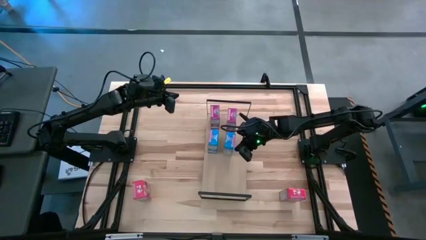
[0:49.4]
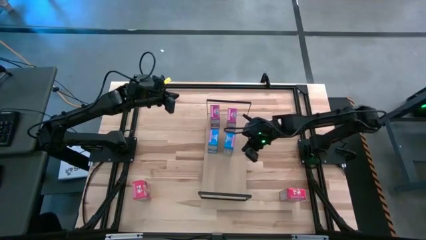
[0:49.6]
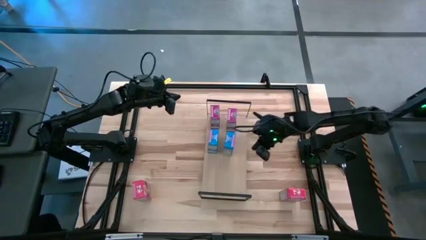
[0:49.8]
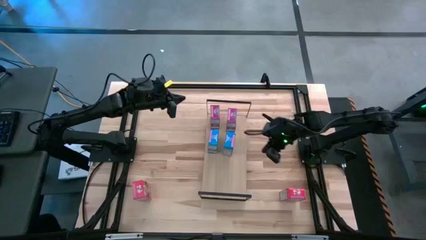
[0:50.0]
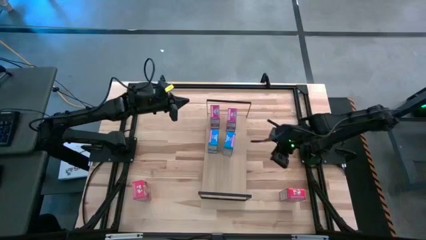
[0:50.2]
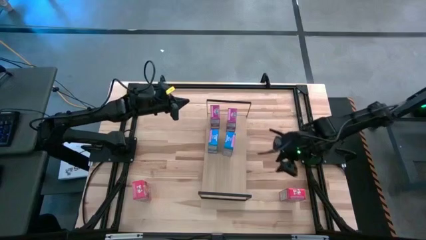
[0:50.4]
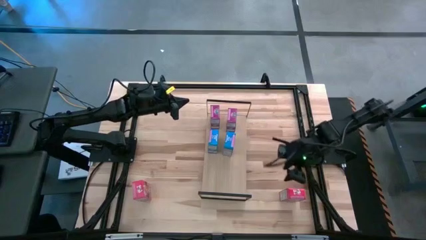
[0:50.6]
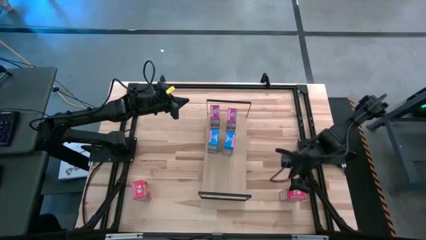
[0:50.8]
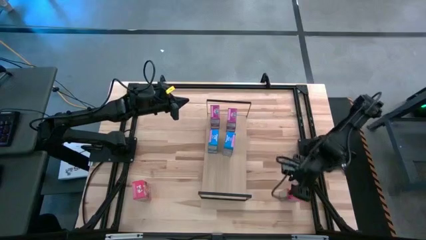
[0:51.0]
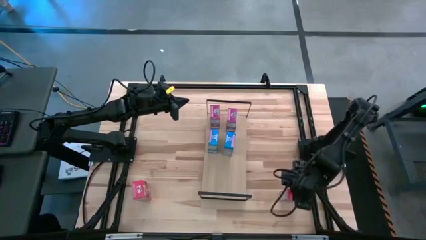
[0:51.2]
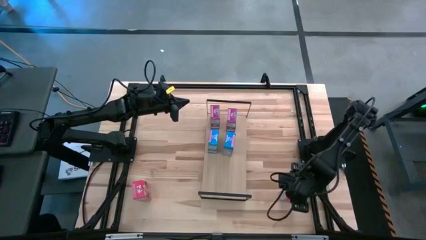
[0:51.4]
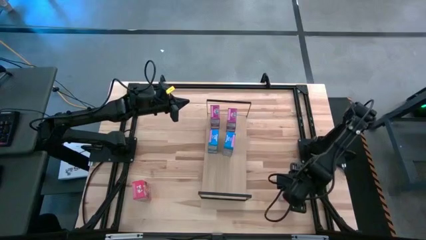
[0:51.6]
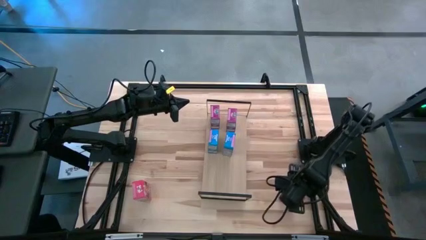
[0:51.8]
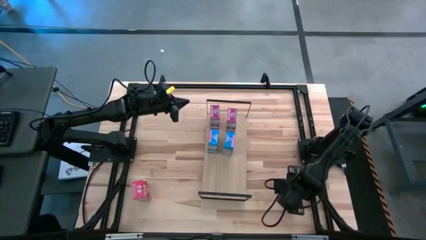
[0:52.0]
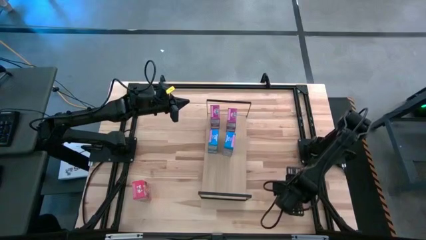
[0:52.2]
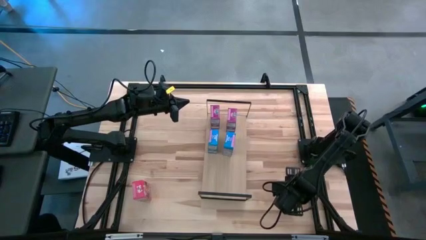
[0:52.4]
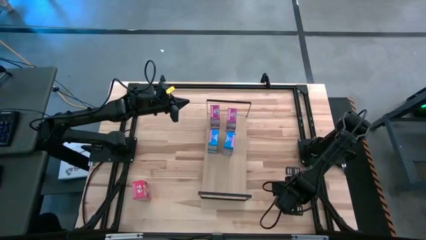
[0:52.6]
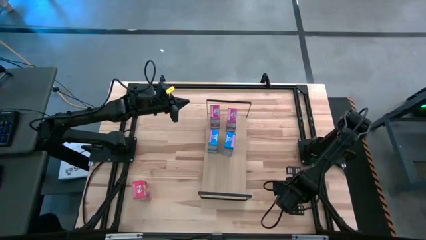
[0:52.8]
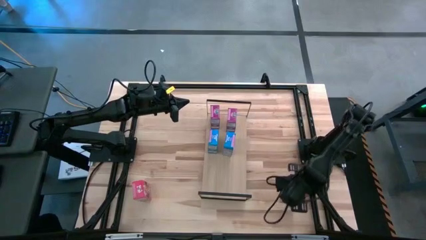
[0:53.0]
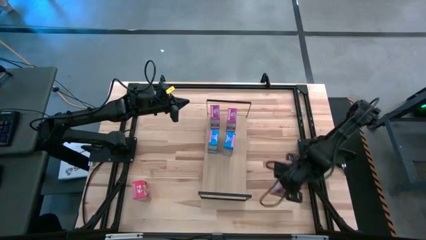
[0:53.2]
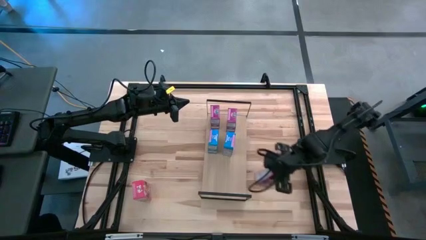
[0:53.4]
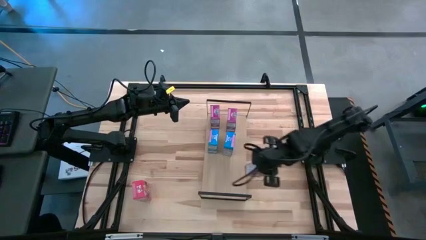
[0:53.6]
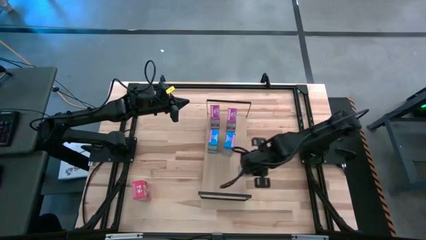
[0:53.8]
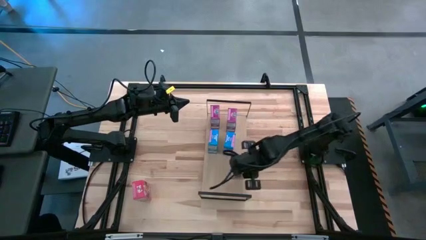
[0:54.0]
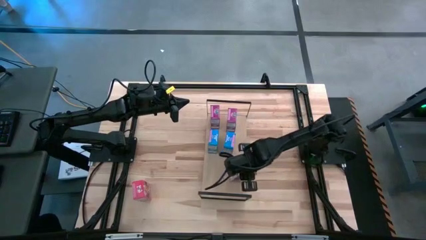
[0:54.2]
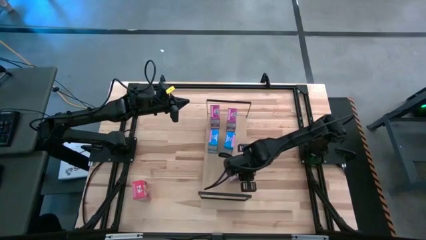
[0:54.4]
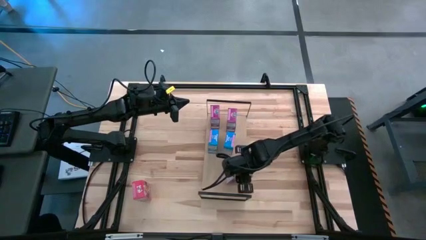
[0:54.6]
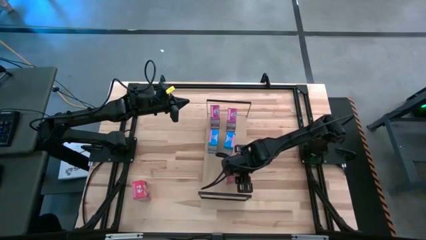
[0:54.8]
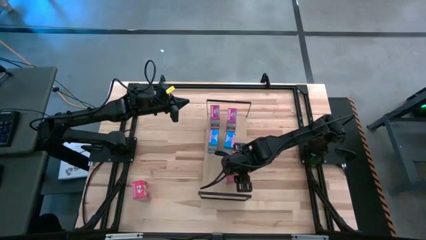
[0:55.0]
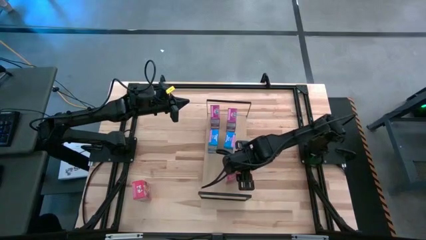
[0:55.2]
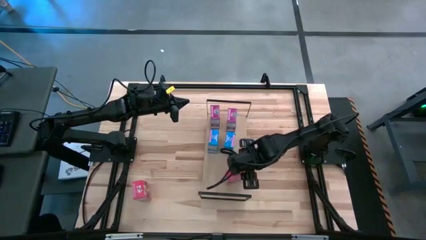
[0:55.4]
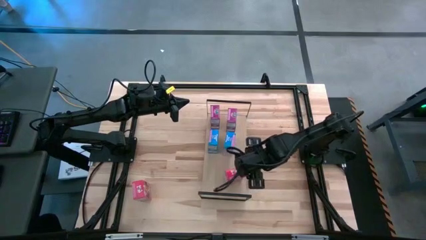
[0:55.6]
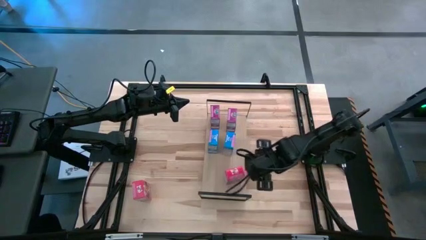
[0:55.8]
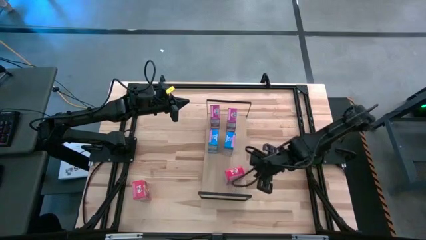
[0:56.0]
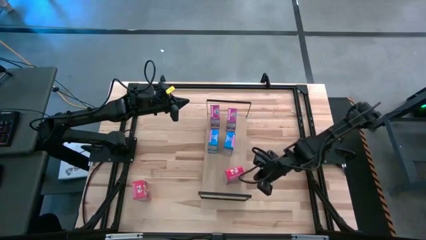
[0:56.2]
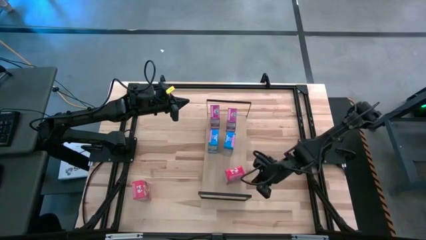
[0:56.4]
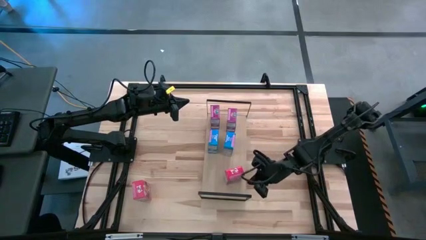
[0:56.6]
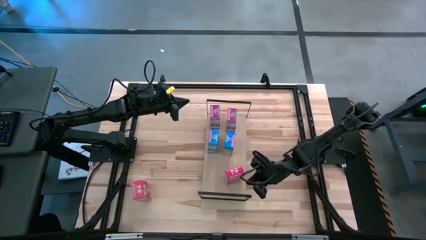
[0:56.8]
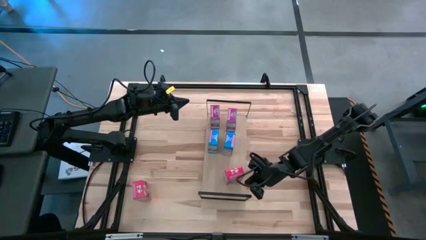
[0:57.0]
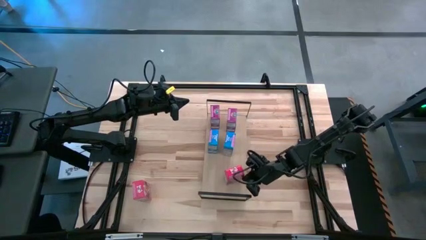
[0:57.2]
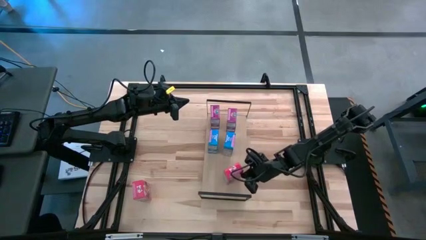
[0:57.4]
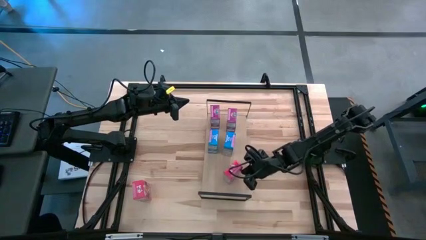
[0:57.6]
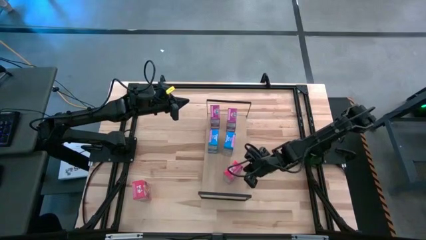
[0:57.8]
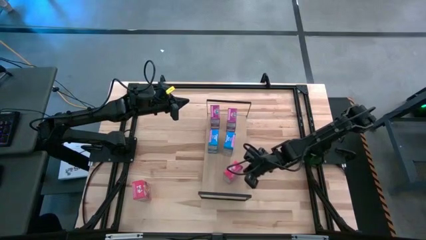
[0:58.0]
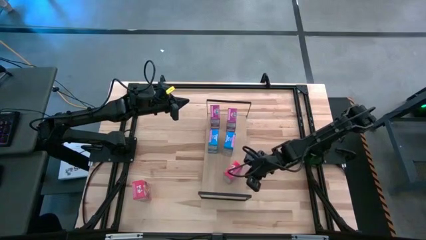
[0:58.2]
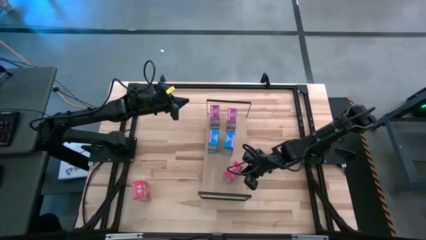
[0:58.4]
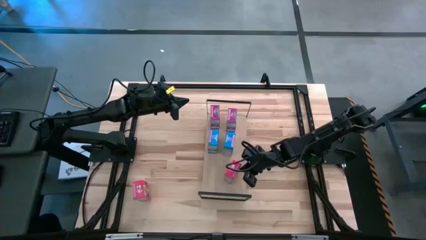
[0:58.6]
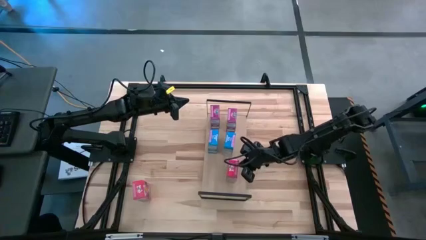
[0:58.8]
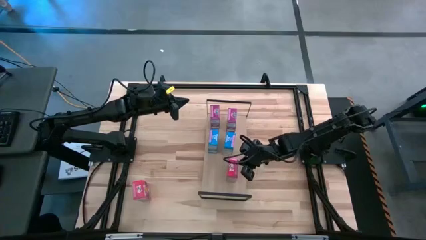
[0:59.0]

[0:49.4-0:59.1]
Task: Stack cereal on shelf
Put the right red cereal box on the shelf
